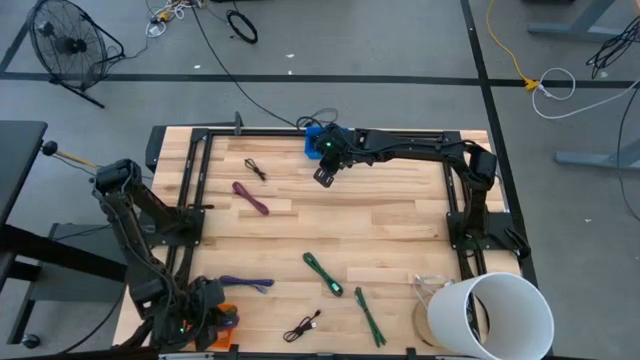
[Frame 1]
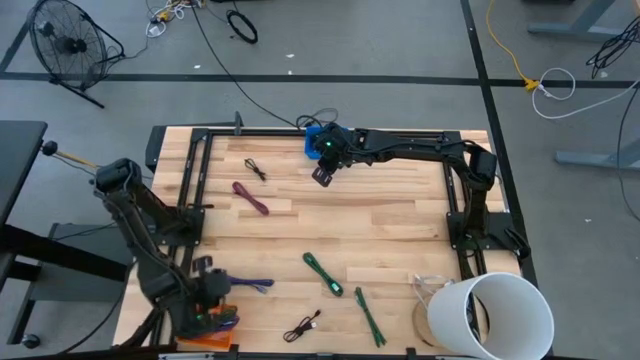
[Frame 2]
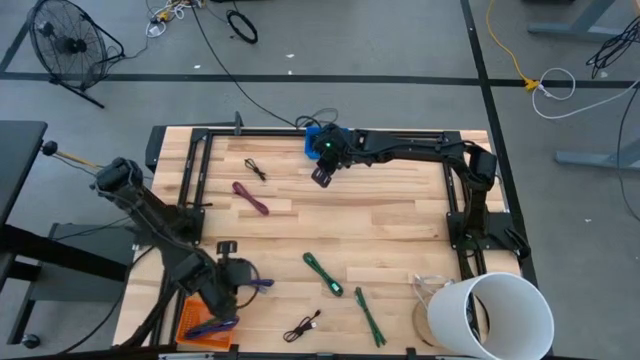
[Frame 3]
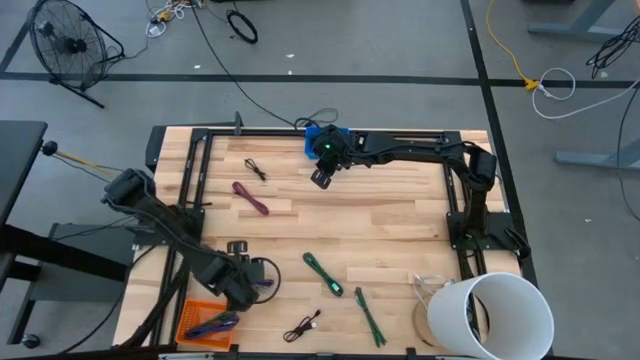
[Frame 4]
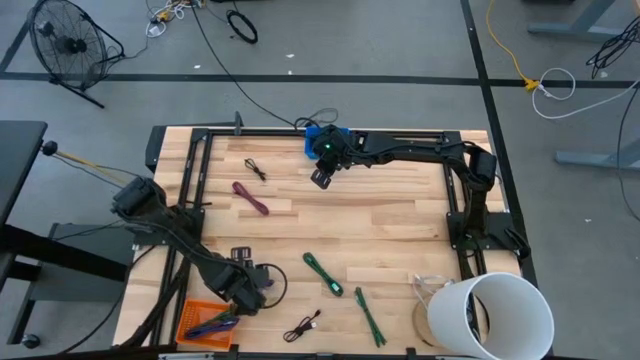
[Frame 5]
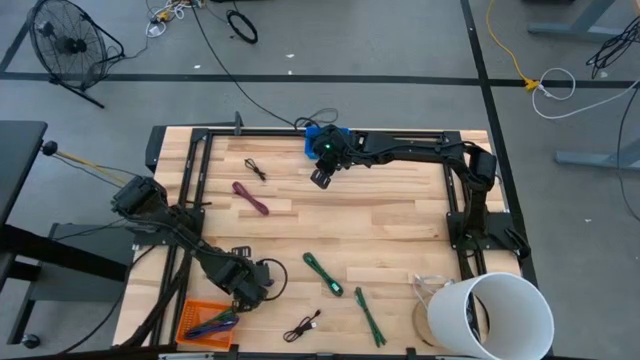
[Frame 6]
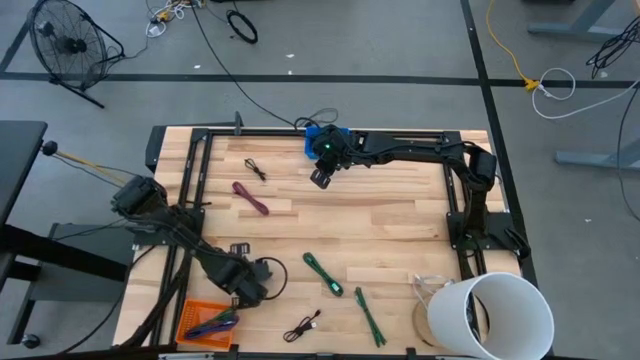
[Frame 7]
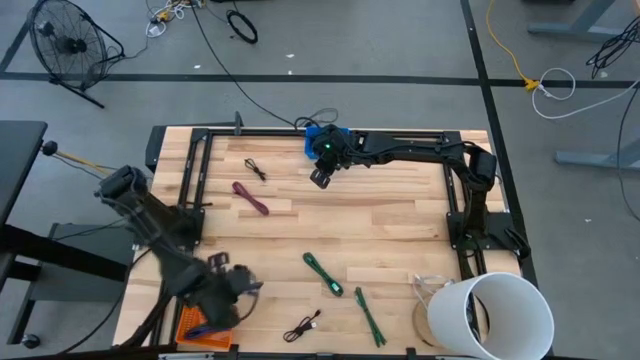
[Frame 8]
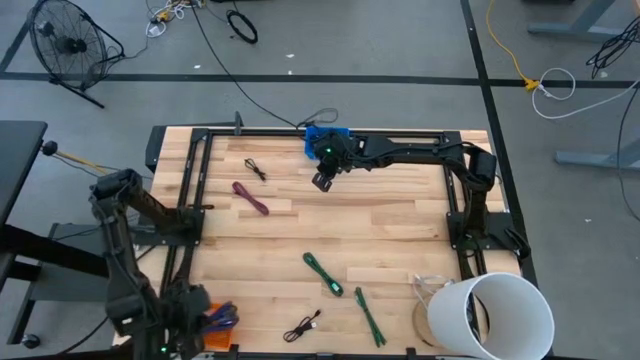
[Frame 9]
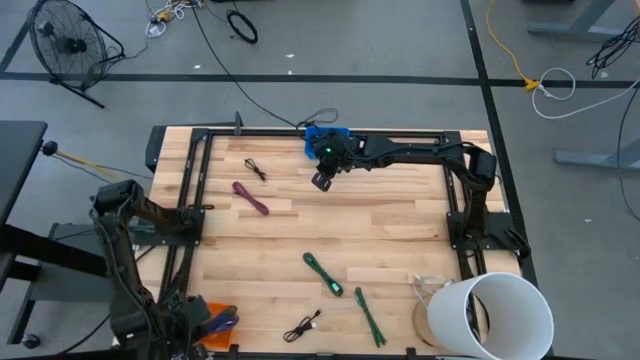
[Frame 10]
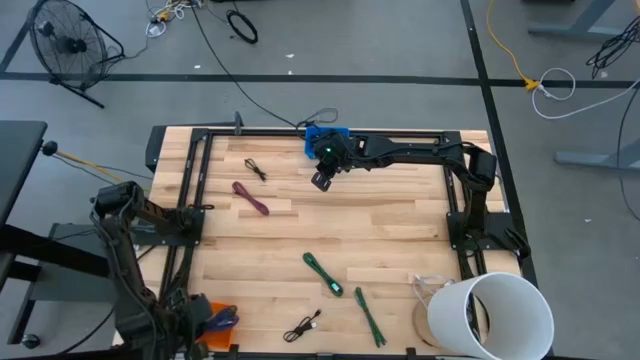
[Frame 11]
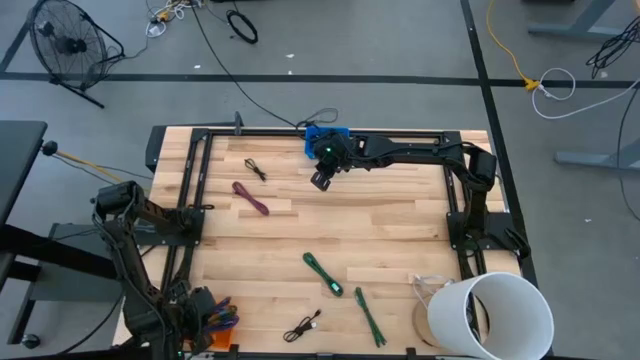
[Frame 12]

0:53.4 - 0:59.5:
Task: Pick & Place USB Port
Put the purple black charger cable into the orange bin

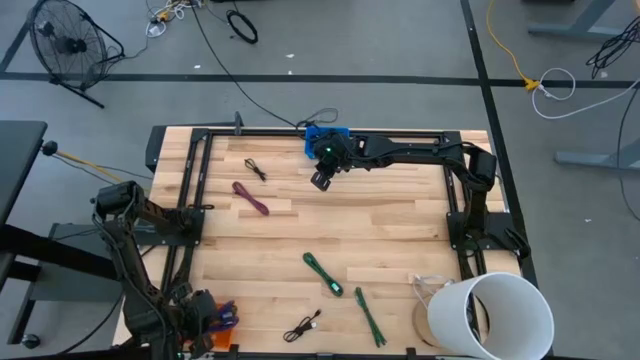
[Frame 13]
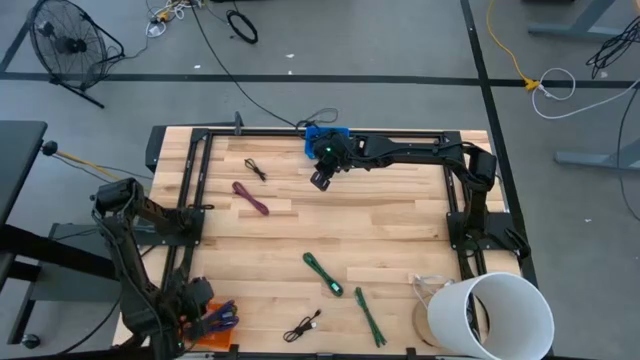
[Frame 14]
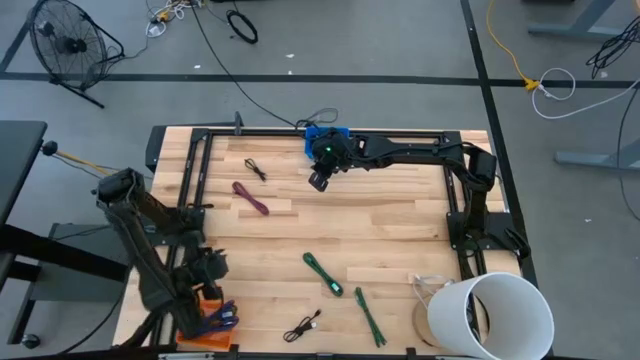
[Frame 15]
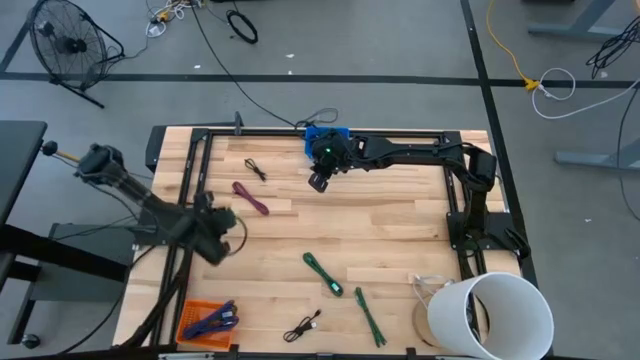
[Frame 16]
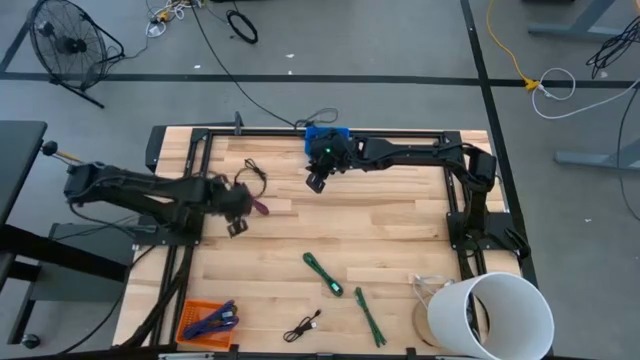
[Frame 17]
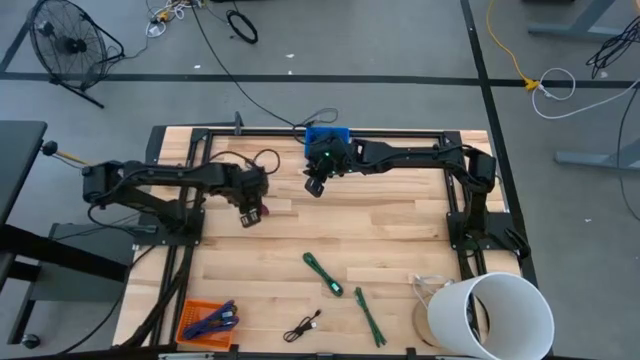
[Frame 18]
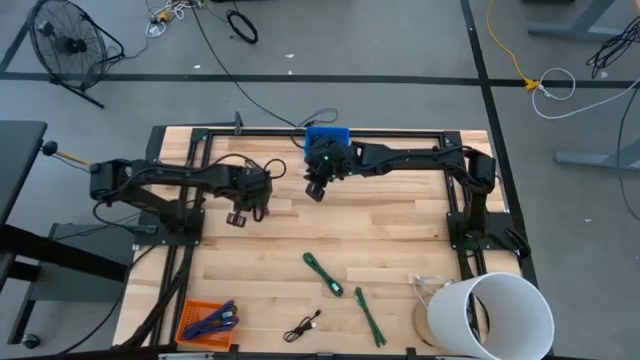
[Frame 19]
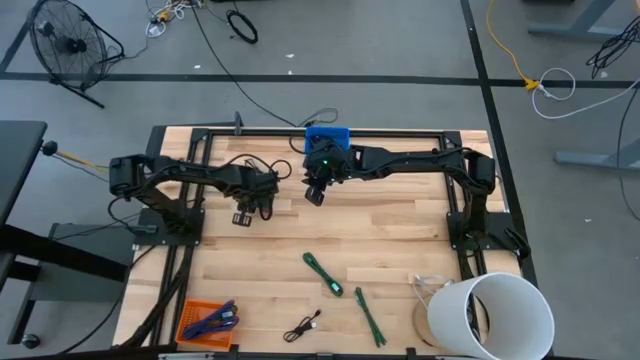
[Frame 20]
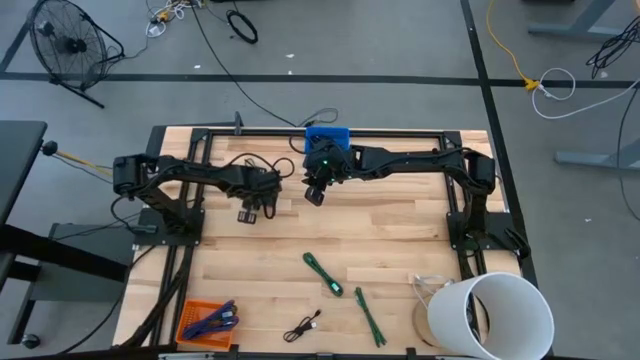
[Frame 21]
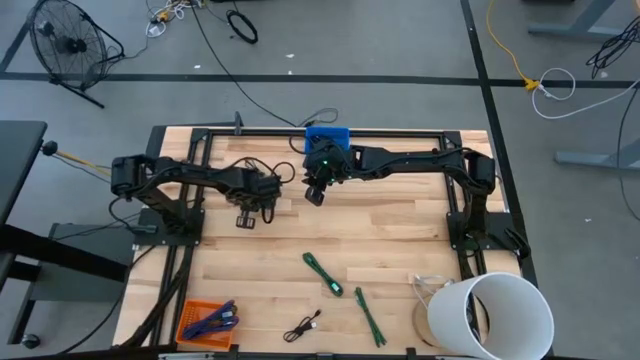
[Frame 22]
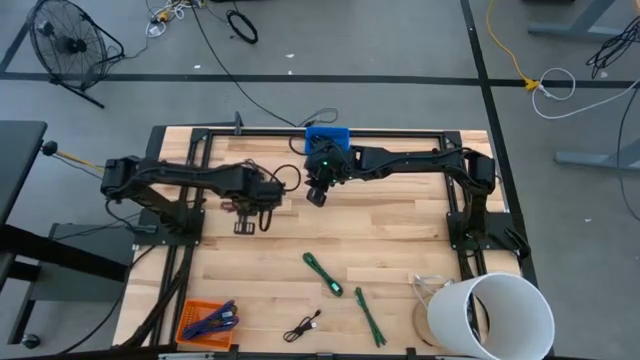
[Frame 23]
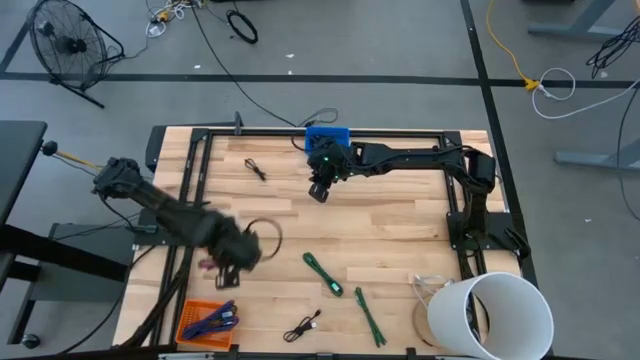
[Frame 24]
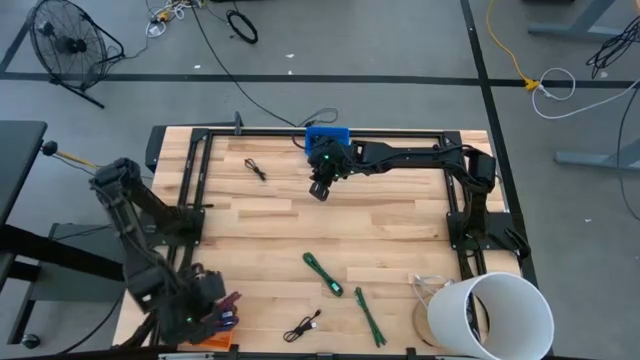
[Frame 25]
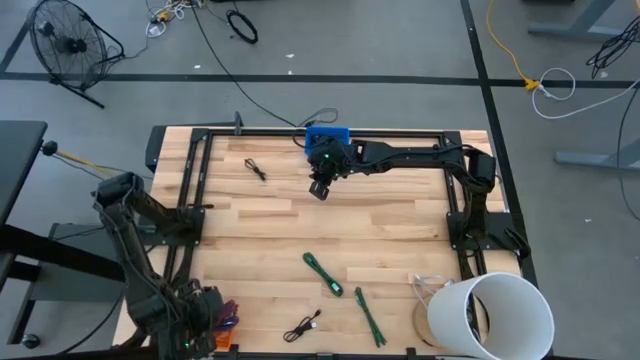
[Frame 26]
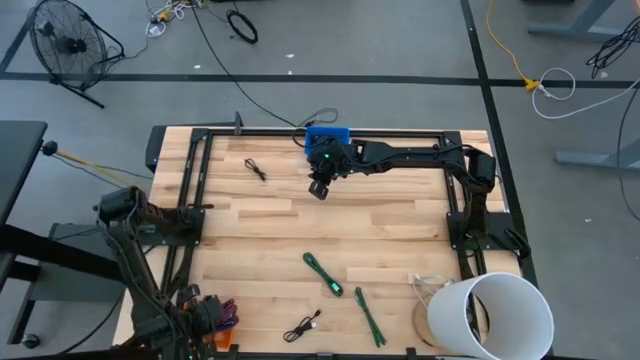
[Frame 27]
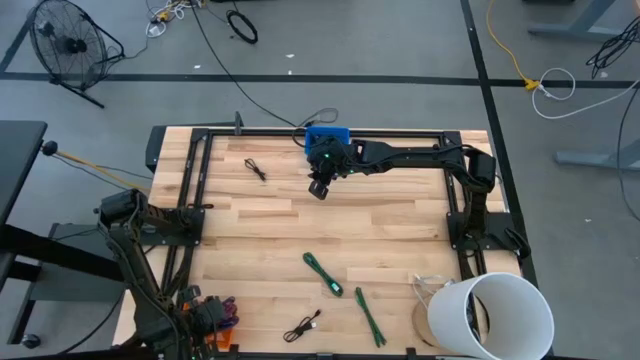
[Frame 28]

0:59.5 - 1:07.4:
Put the pink black charger cable into the orange bin

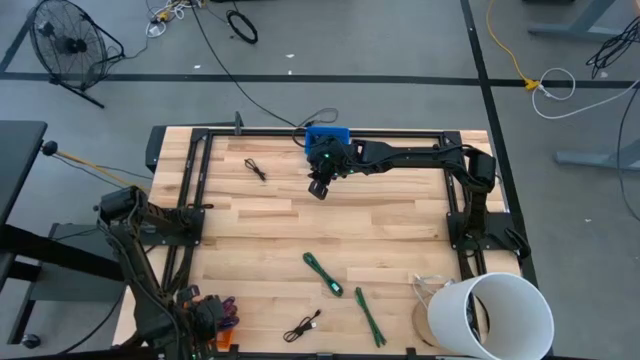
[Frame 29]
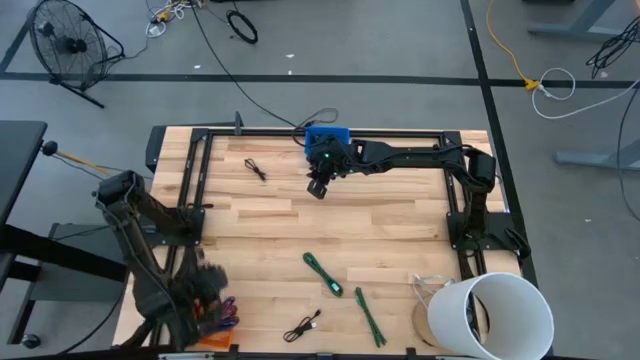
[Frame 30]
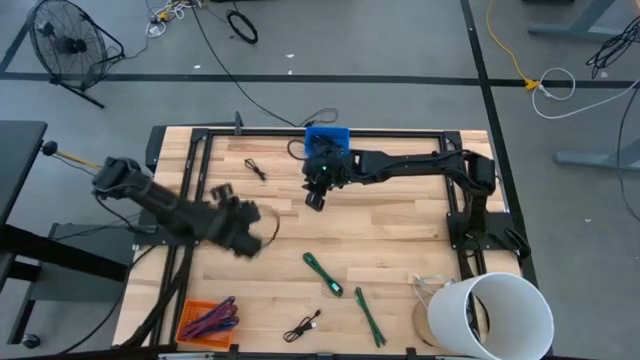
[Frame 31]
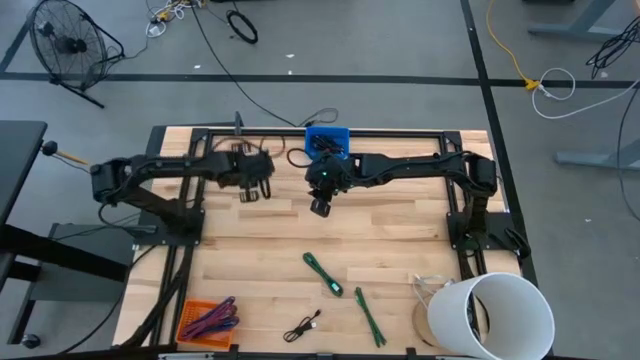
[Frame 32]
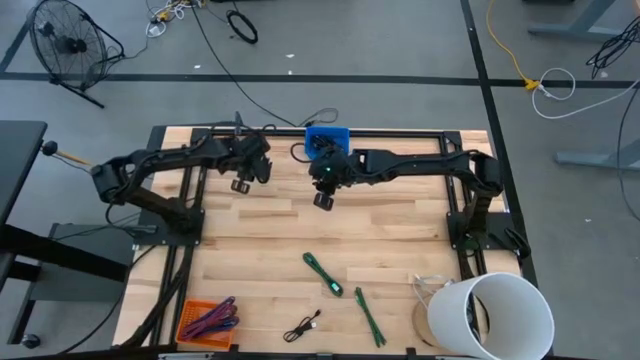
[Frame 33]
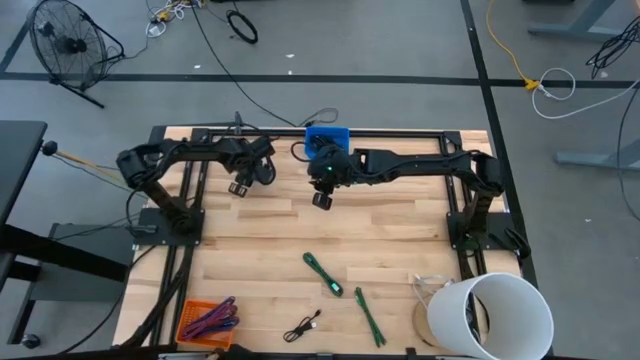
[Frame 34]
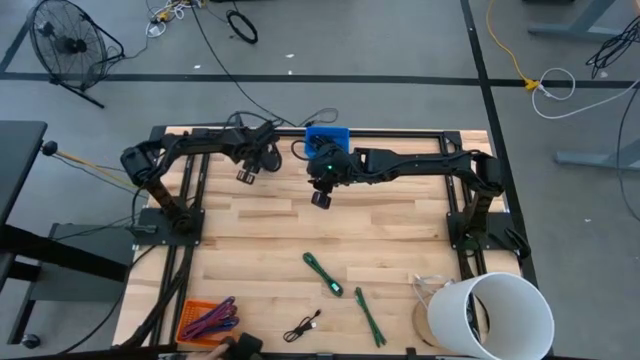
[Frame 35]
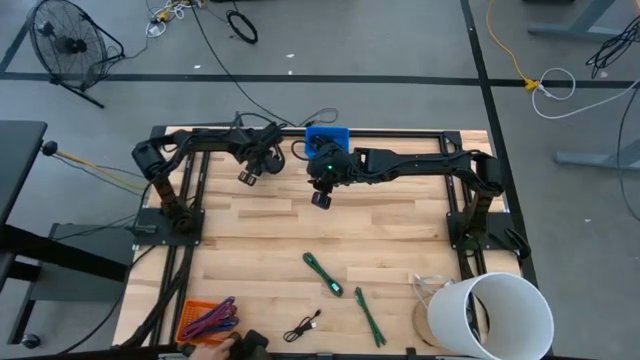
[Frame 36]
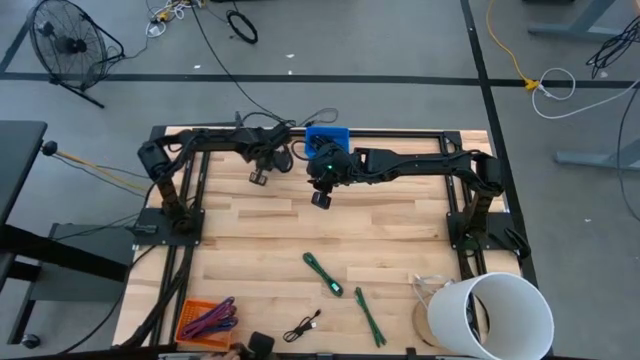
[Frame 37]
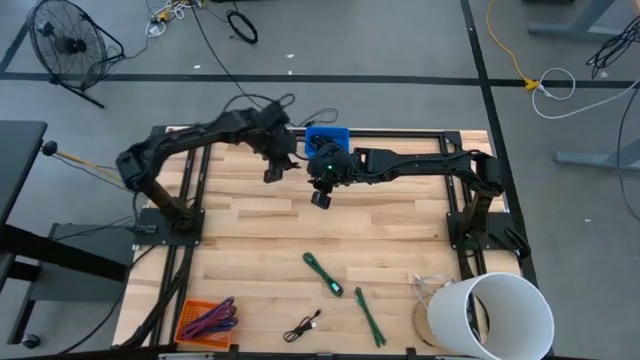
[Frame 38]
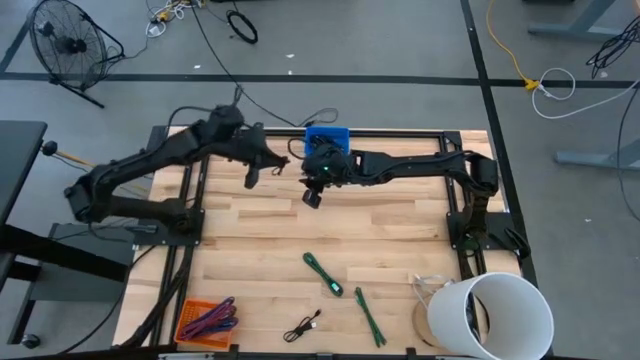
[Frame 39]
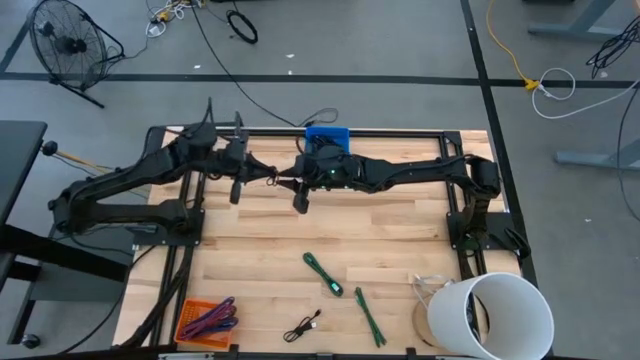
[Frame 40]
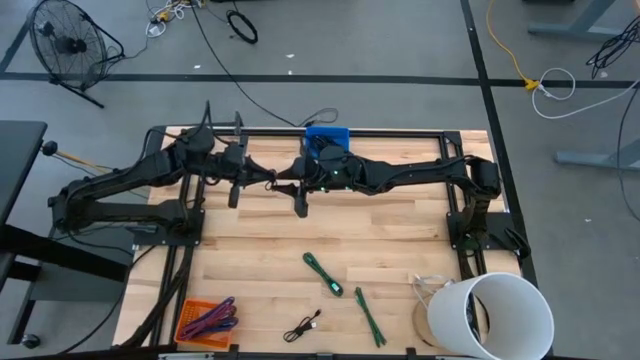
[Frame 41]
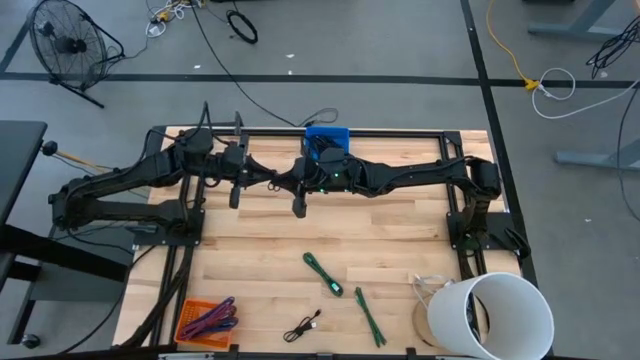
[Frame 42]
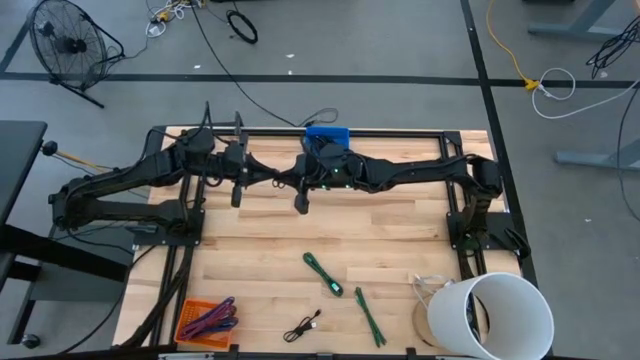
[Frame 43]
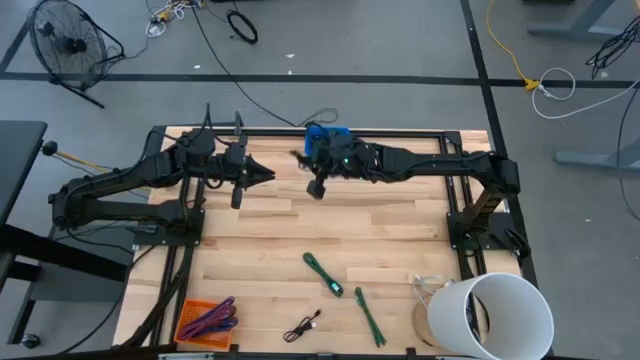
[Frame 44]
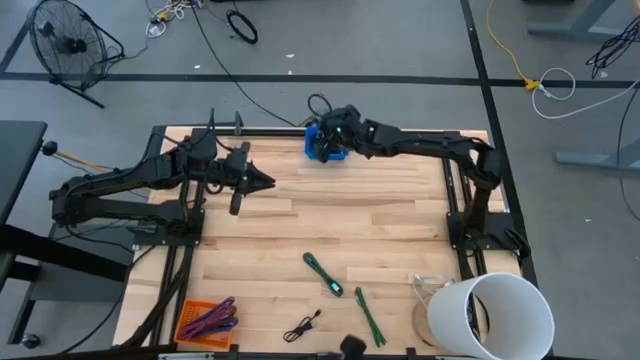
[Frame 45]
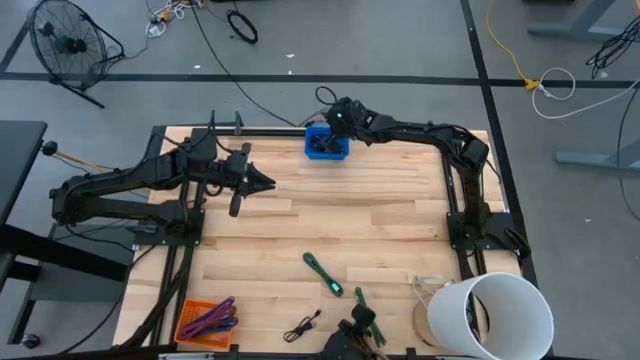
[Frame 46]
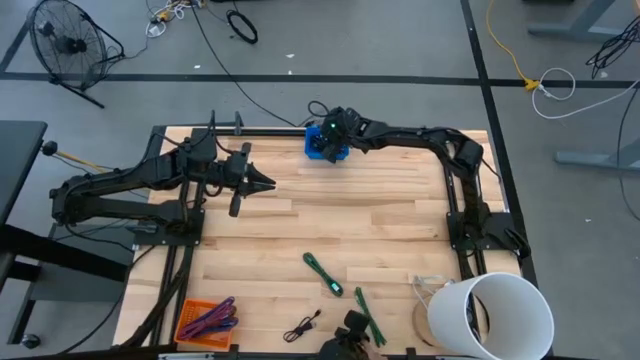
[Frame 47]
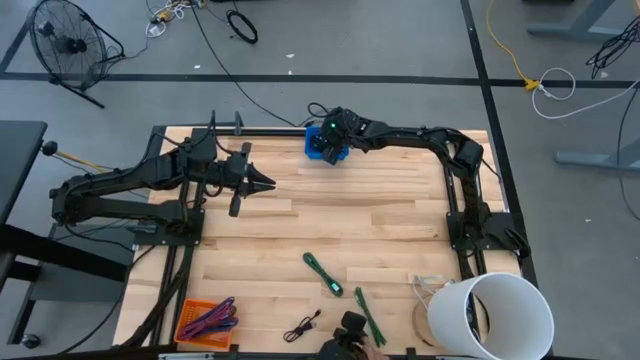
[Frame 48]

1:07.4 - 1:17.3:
Put the black charger cable into the blue bin
